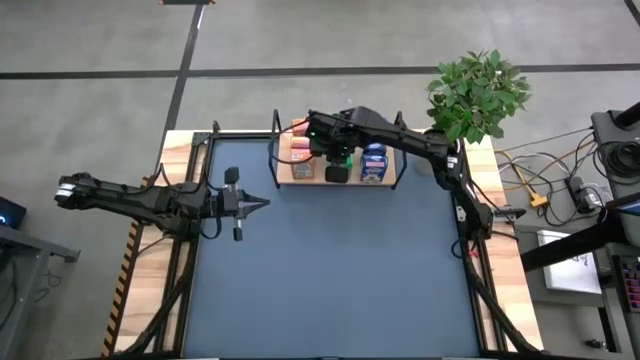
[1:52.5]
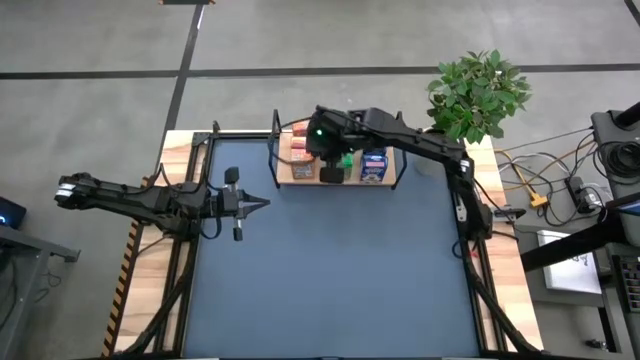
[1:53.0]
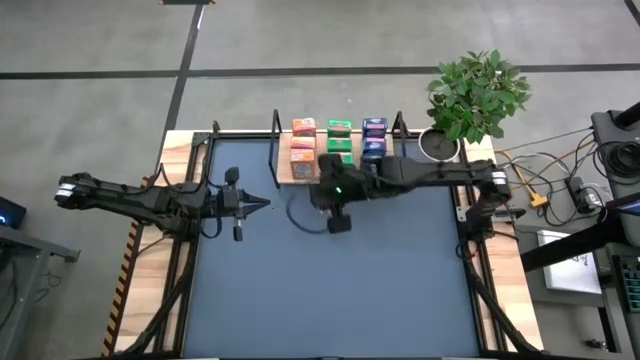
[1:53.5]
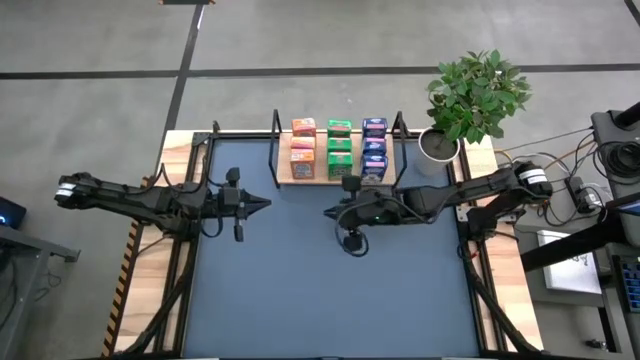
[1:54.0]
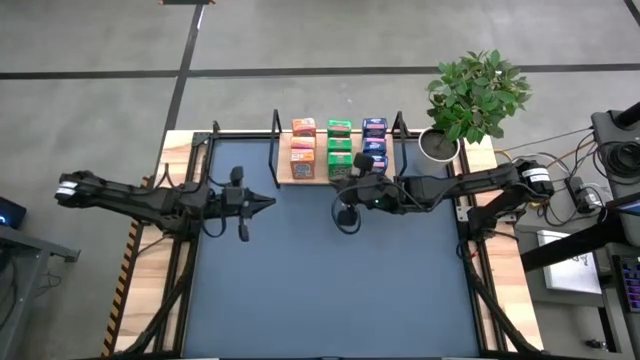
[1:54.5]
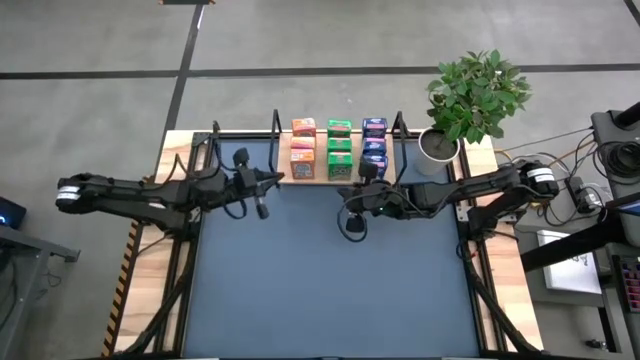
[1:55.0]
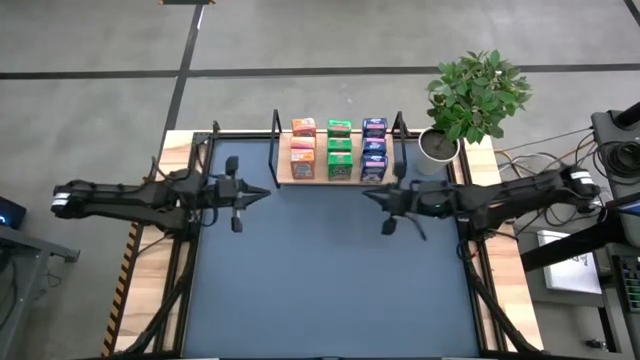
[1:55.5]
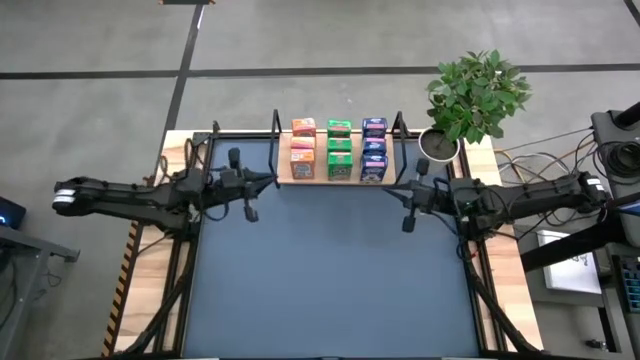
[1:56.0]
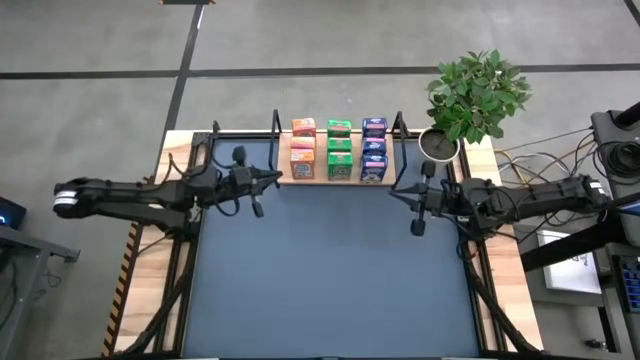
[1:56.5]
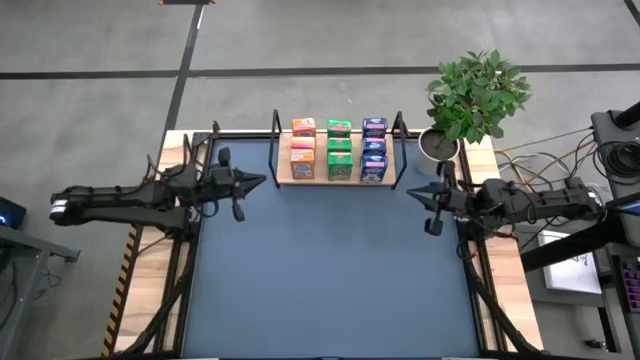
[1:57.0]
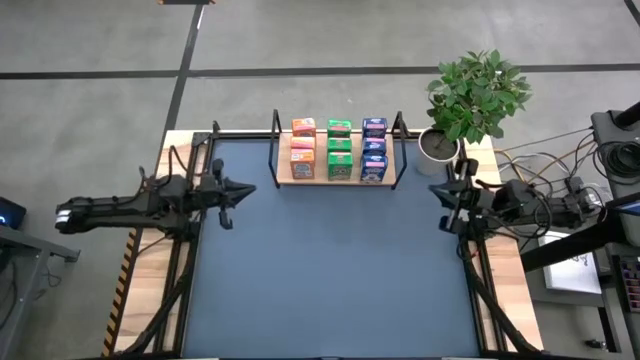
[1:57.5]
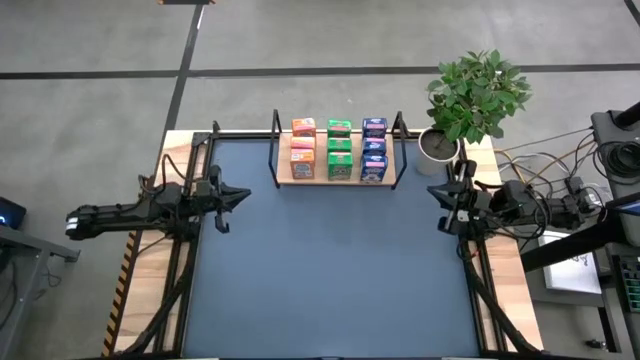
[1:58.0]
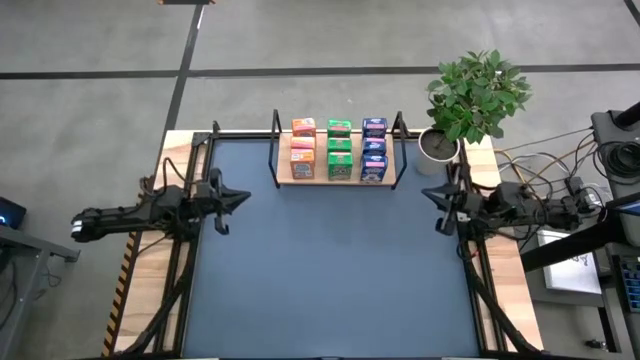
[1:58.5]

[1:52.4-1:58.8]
Task: Stack cereal on shelf
Return to Home Position

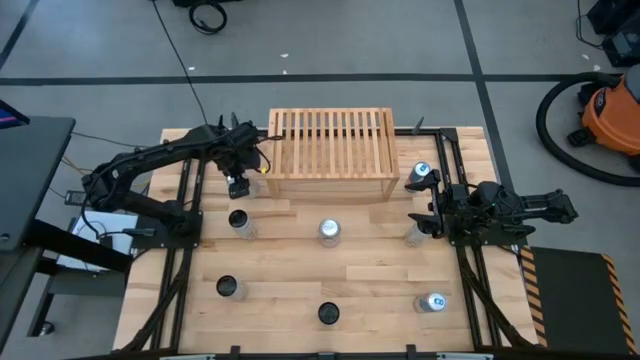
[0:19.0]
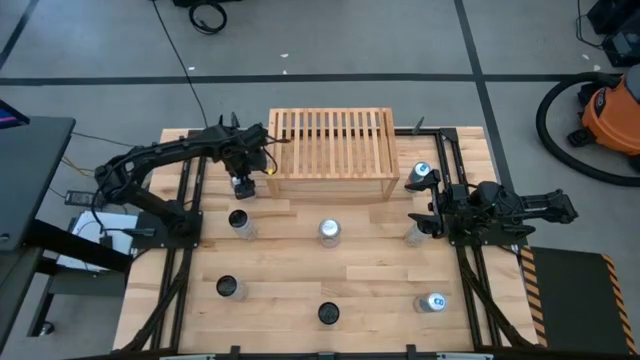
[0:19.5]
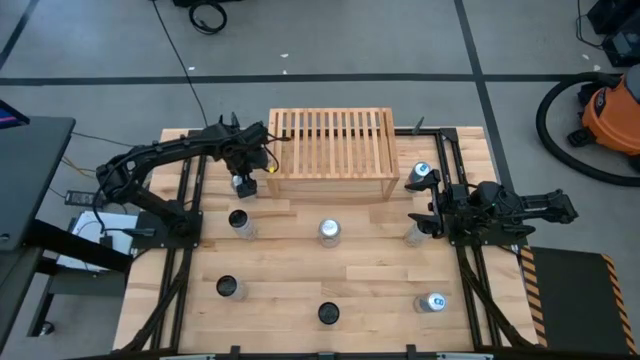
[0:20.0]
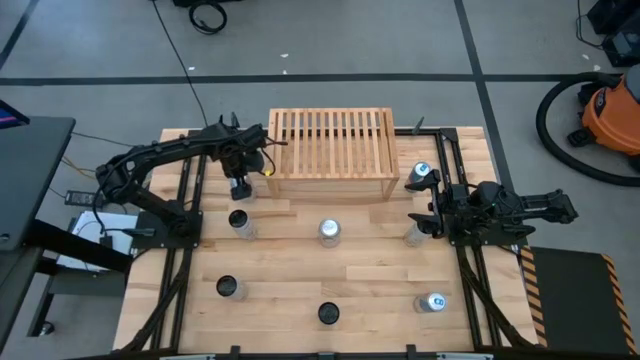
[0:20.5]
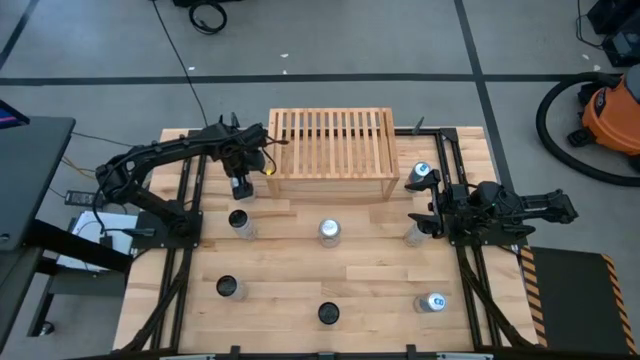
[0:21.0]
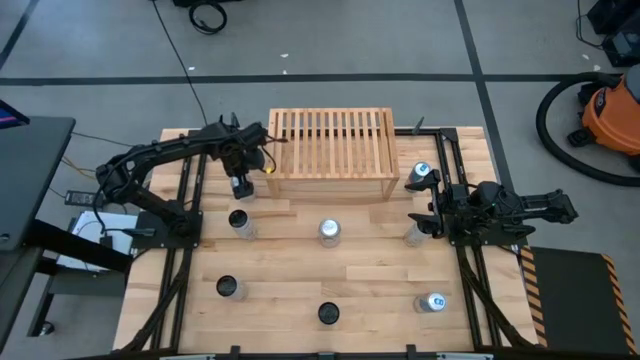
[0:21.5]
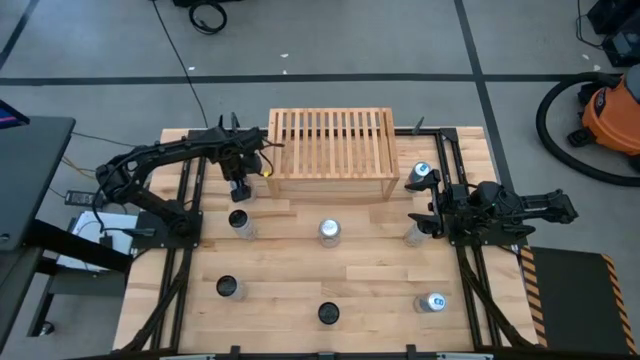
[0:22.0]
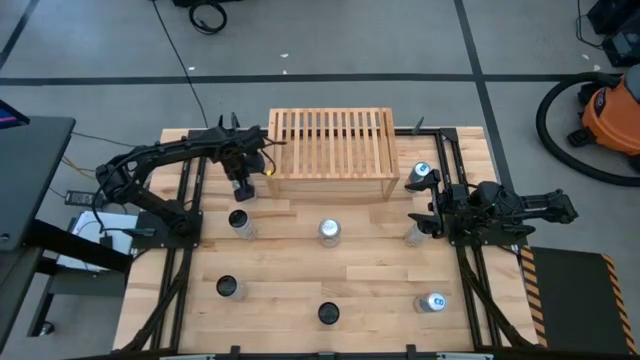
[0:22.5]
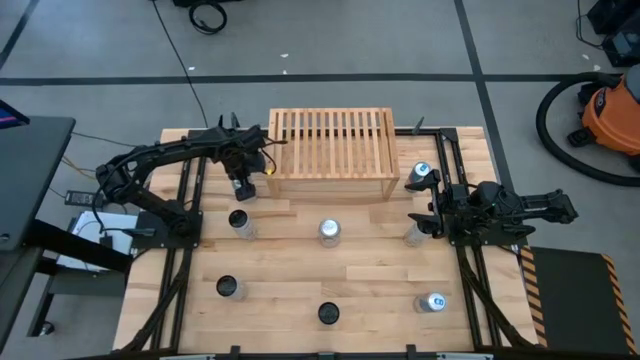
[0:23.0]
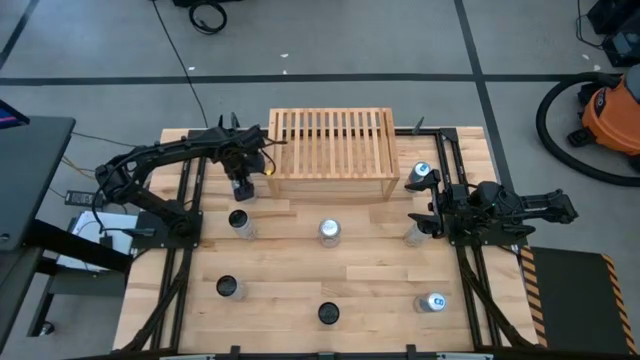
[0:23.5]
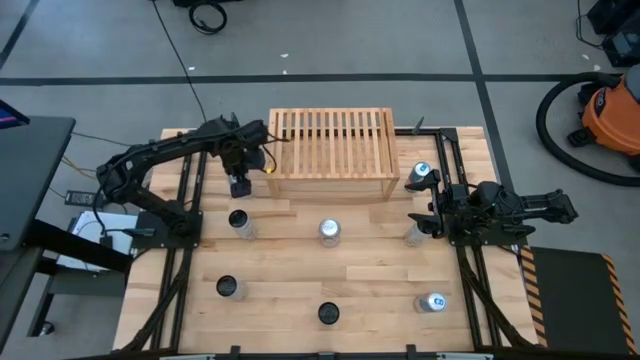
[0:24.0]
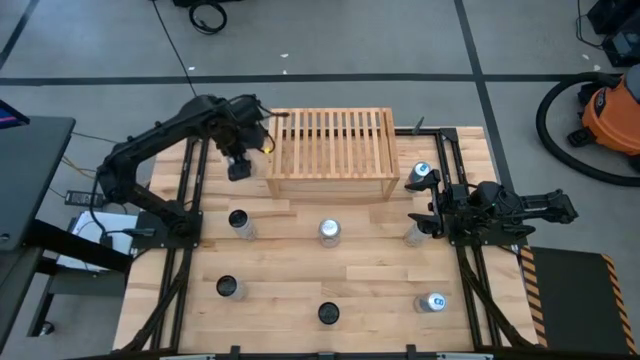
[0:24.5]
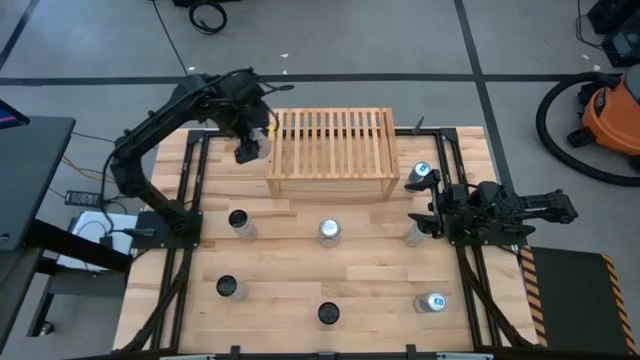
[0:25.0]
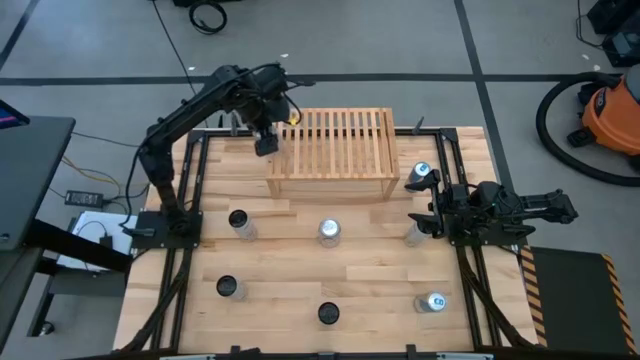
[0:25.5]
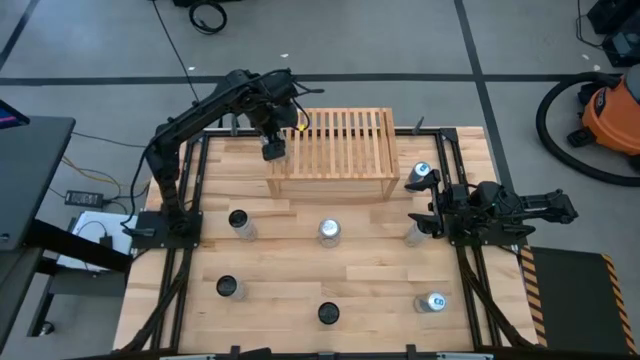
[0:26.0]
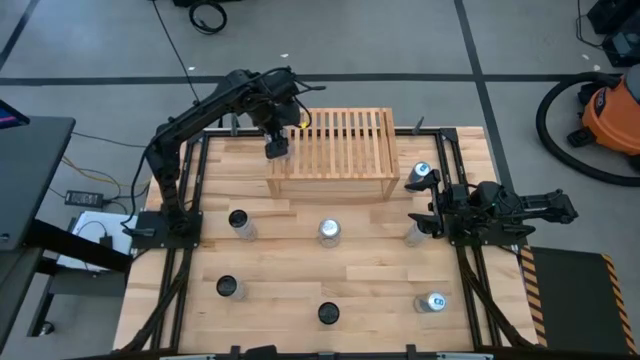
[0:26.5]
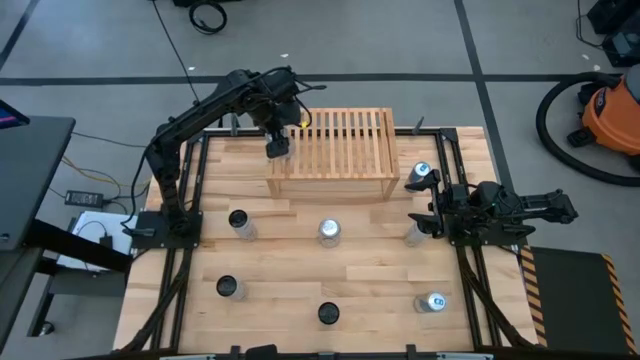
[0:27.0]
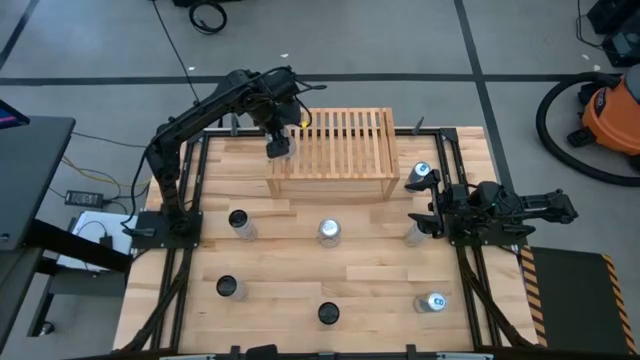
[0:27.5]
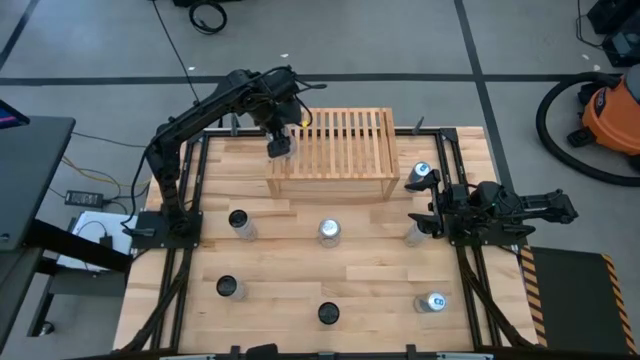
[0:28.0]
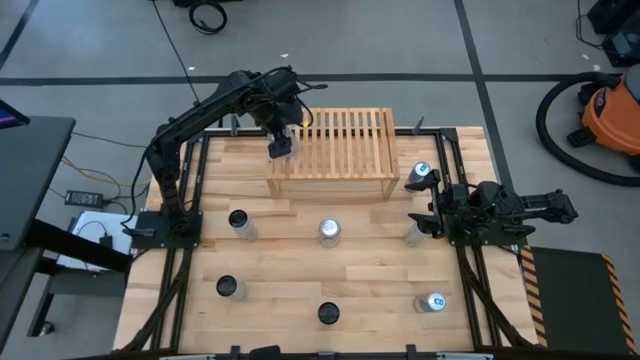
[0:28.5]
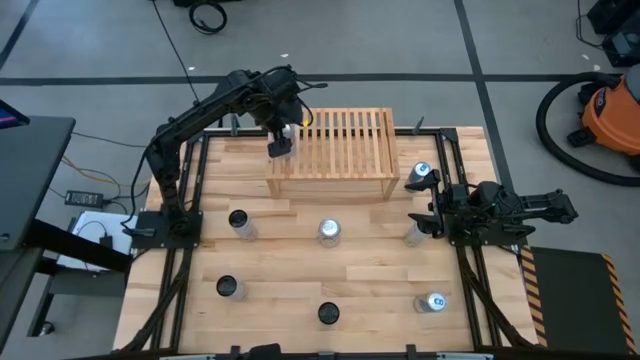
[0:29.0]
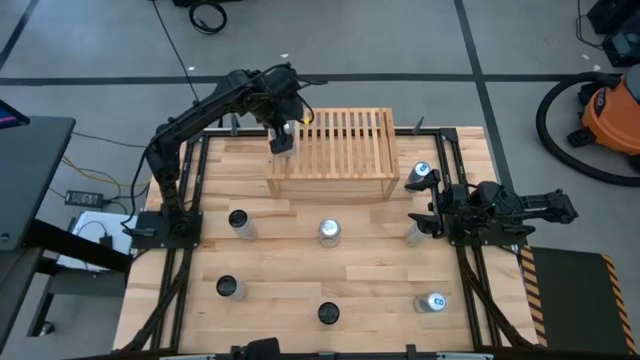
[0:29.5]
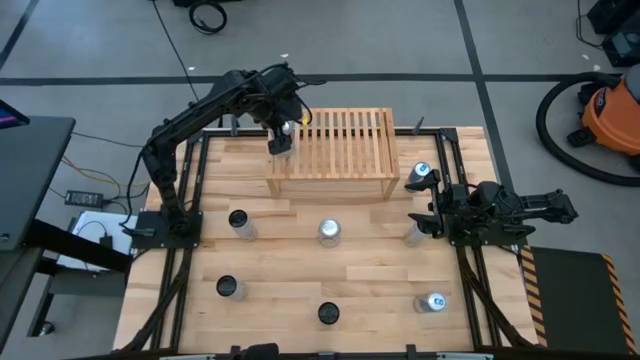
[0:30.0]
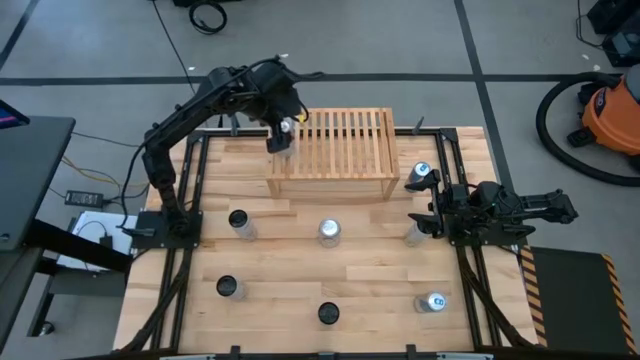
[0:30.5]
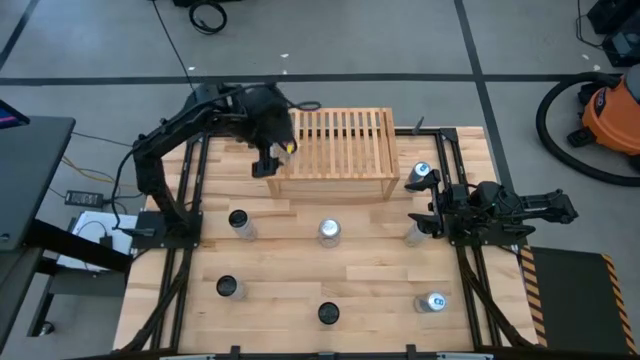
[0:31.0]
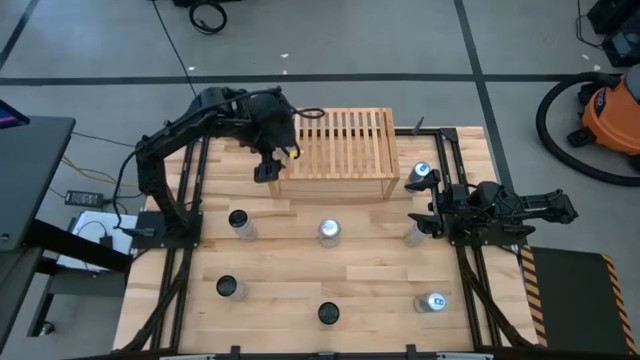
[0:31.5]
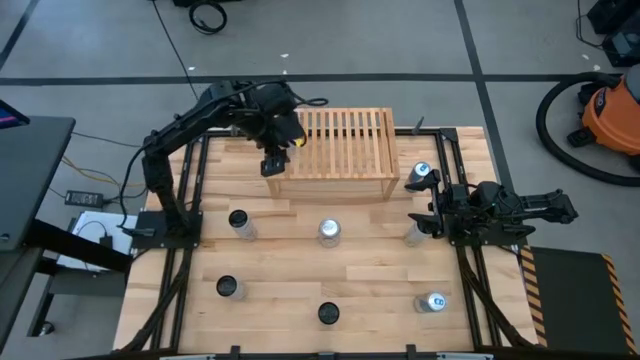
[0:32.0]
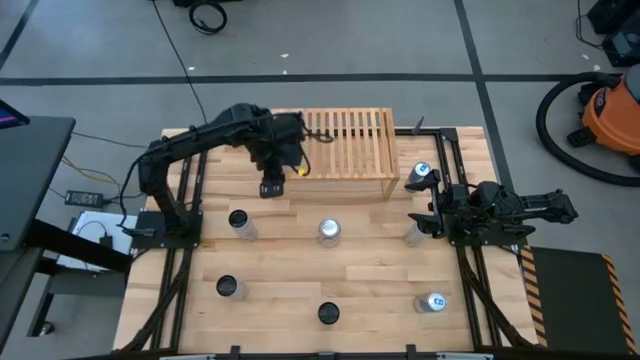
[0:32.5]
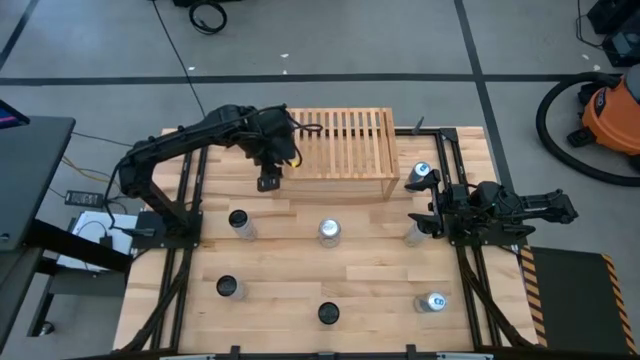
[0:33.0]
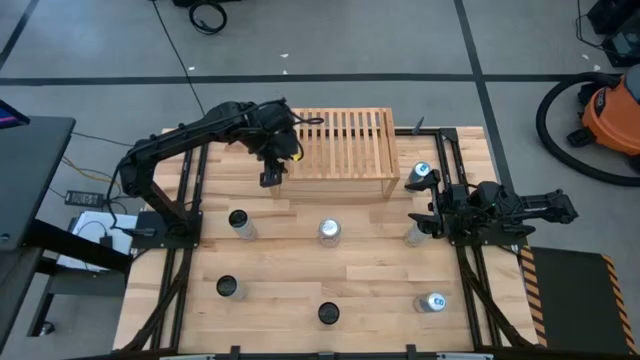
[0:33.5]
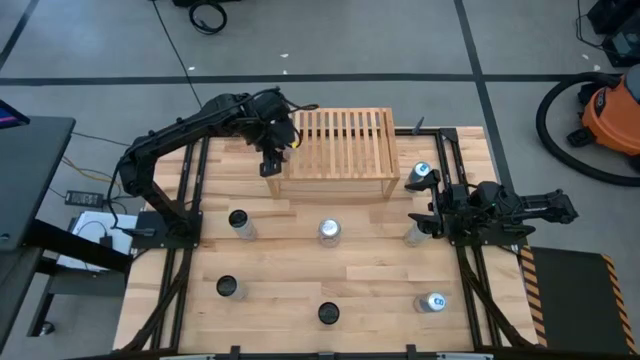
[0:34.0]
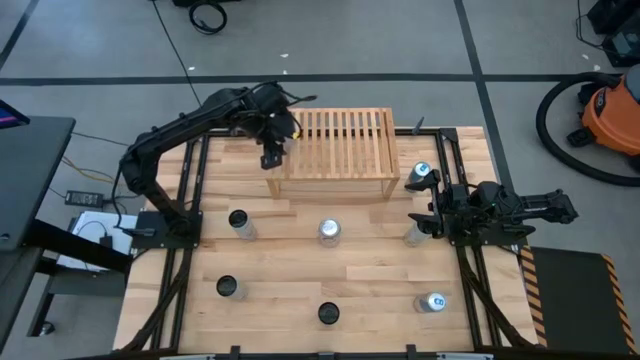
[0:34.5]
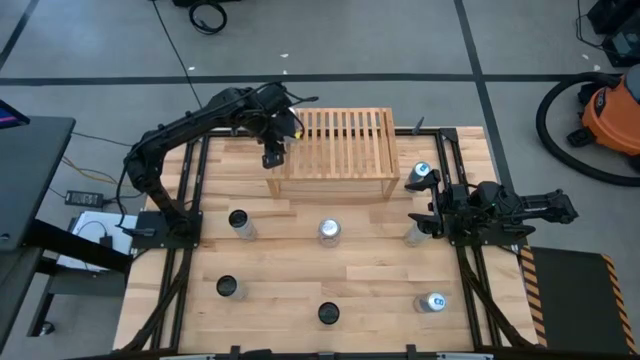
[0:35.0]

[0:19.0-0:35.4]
Task: Place canned beverage on shelf
Put the top red-silver soda can on the shelf
